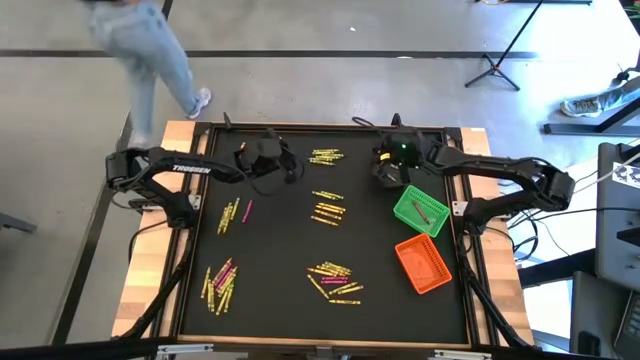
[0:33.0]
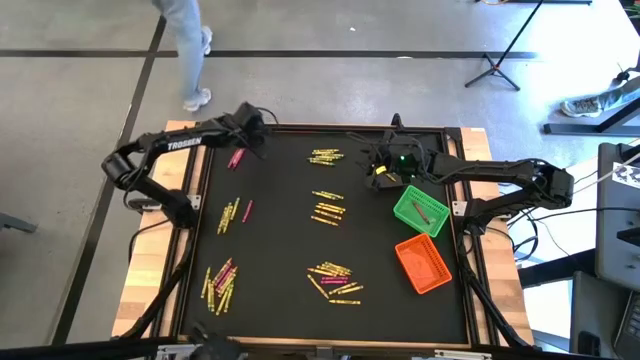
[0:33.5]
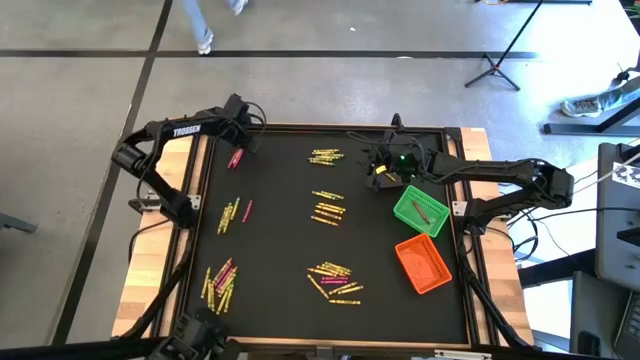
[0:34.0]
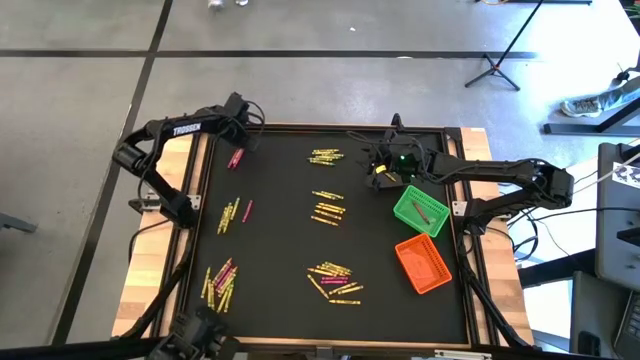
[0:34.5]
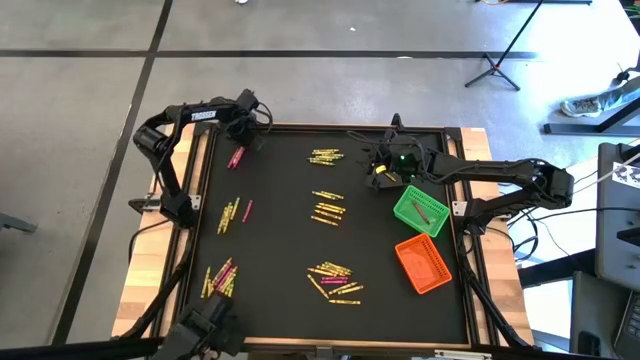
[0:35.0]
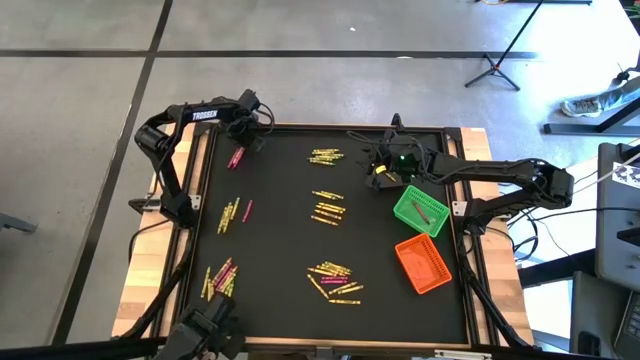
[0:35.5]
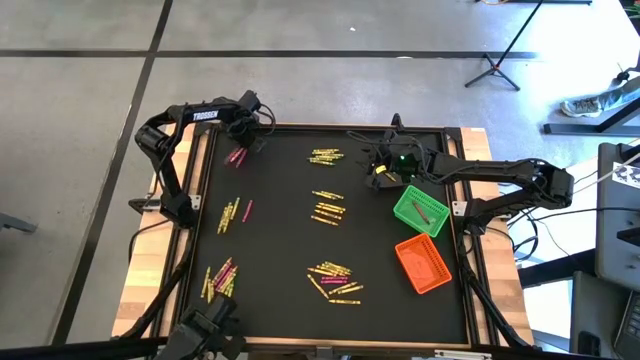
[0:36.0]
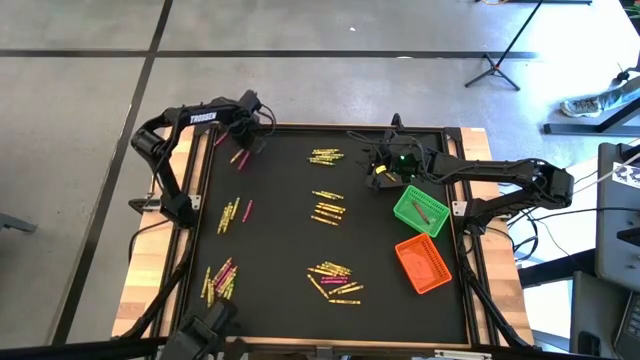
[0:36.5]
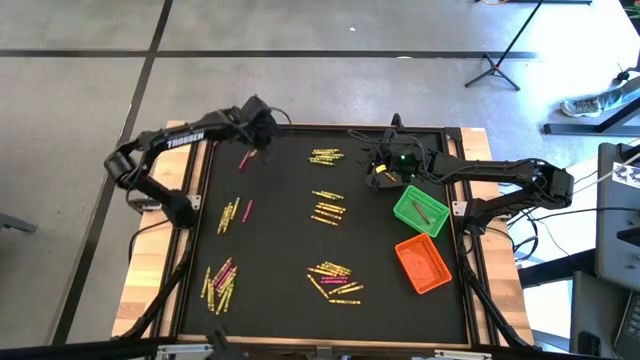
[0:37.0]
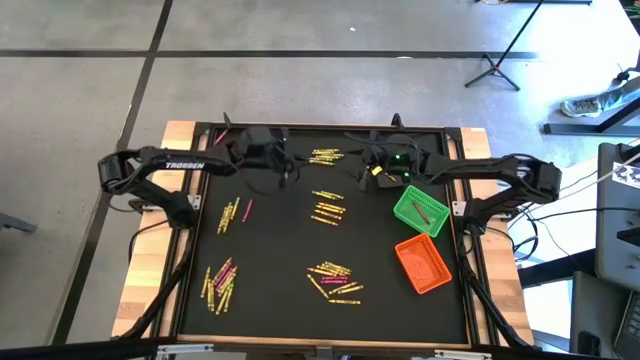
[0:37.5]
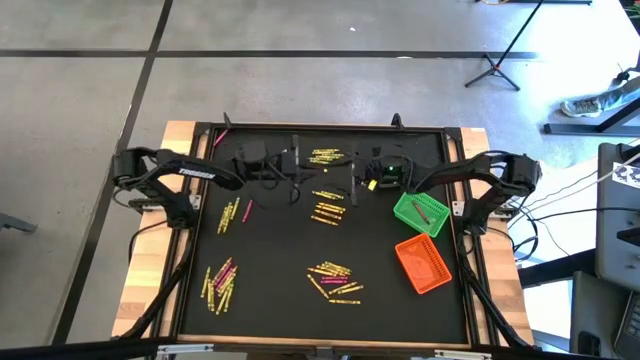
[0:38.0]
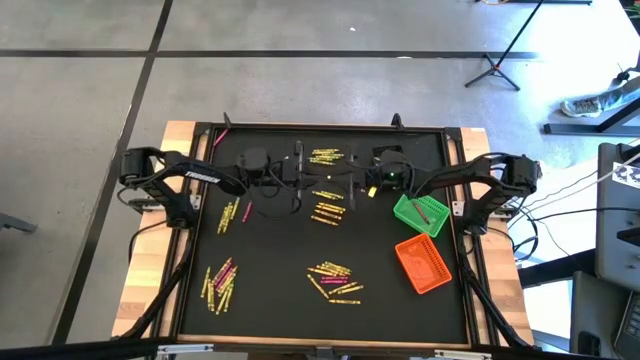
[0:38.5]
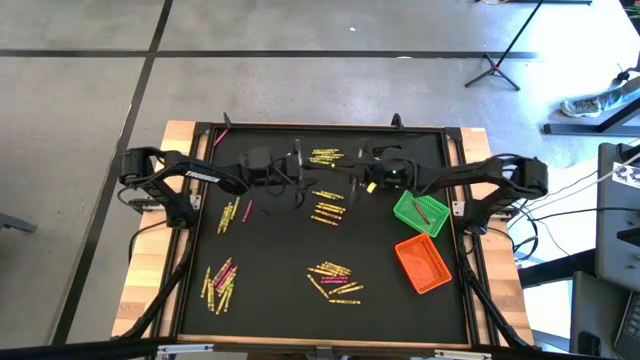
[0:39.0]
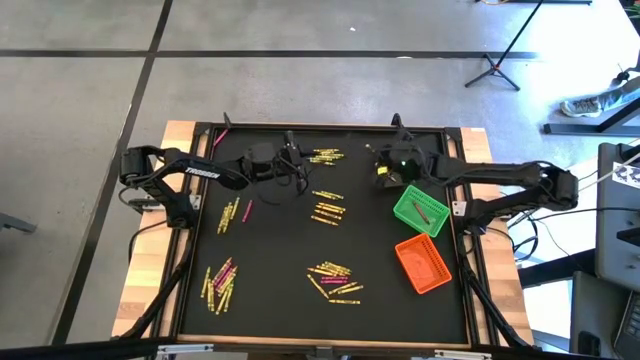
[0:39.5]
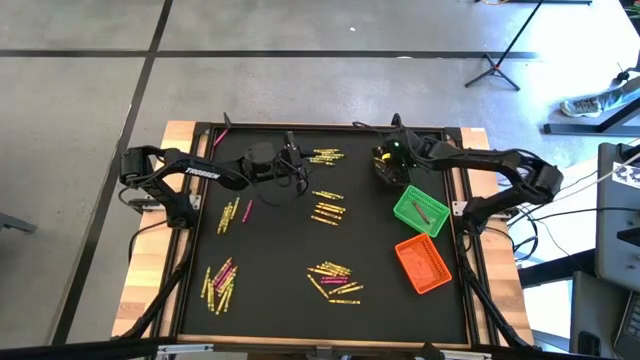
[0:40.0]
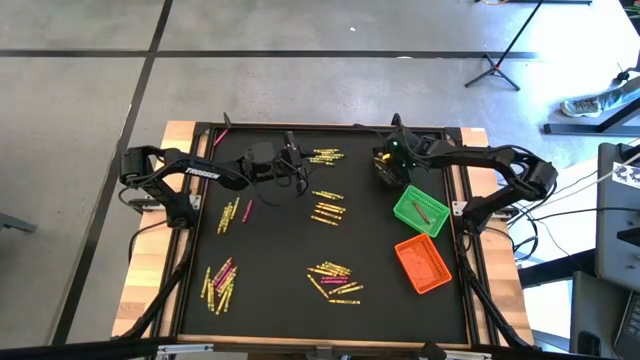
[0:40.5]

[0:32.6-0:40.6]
Task: Sort crayons
Put the yellow crayon into the black basket

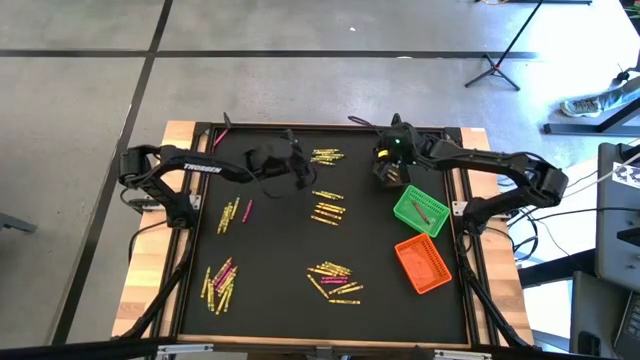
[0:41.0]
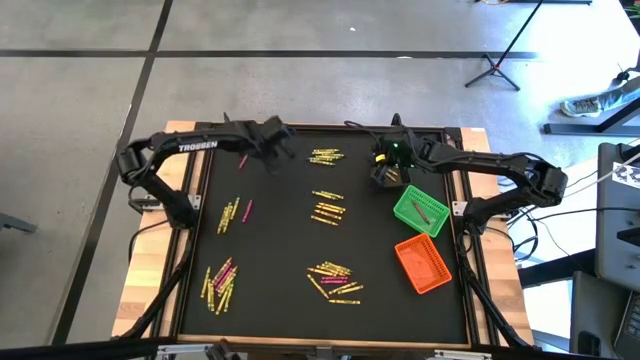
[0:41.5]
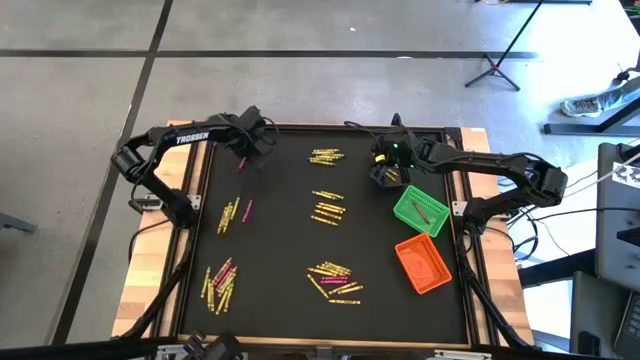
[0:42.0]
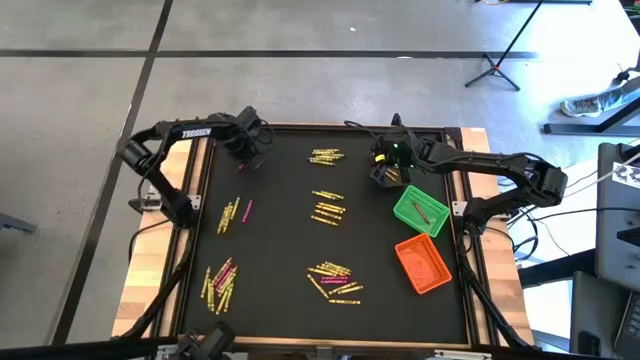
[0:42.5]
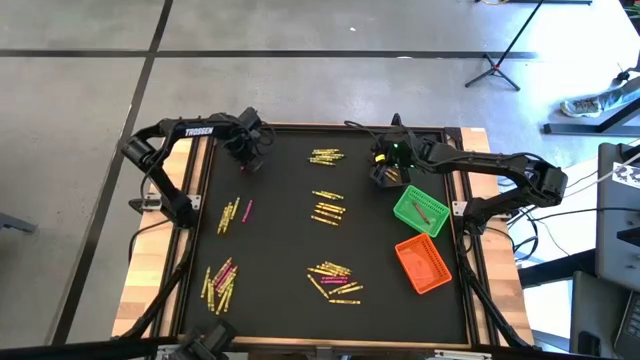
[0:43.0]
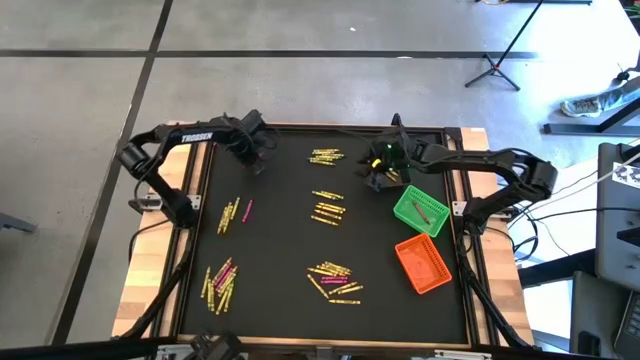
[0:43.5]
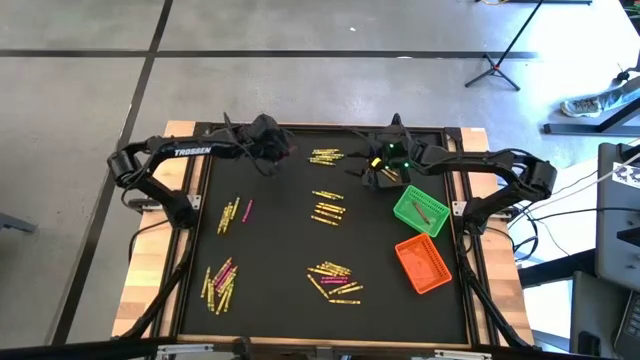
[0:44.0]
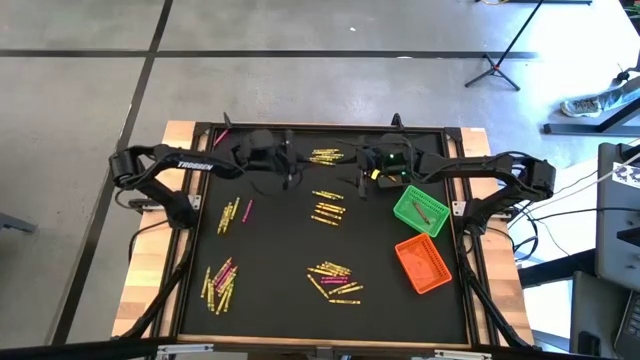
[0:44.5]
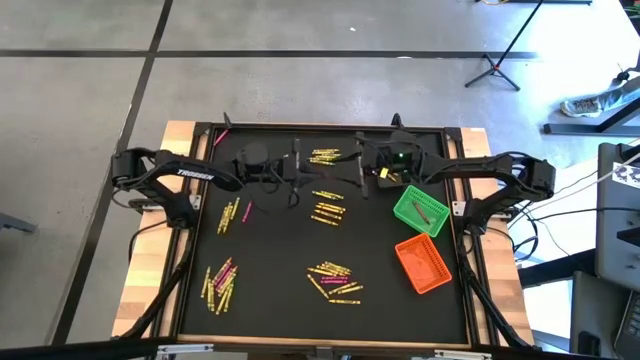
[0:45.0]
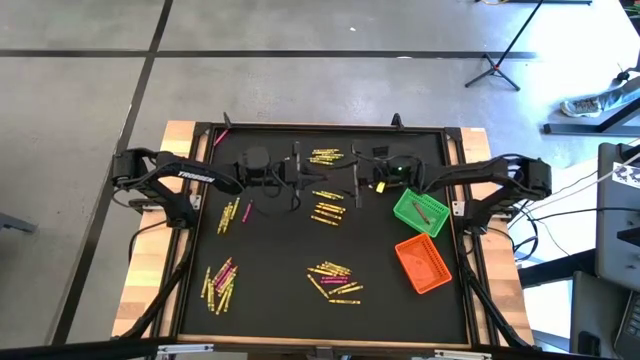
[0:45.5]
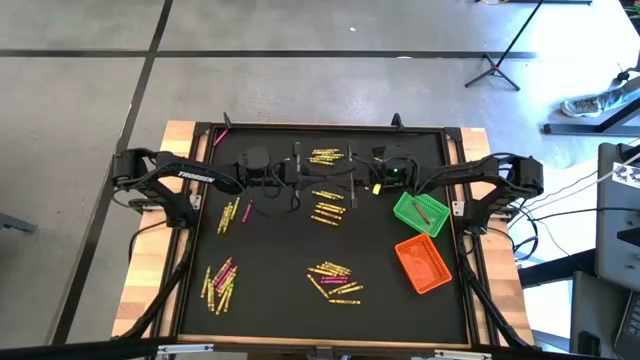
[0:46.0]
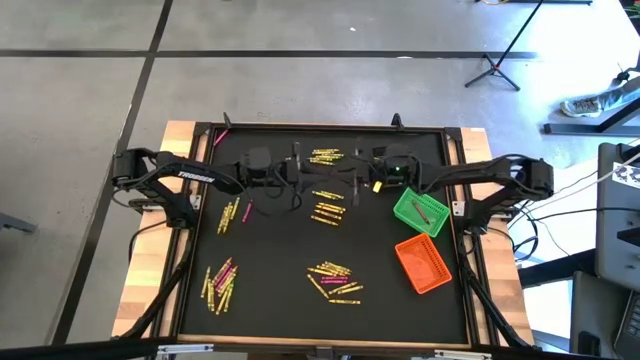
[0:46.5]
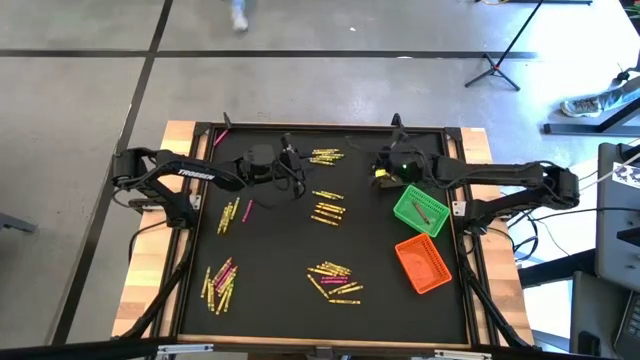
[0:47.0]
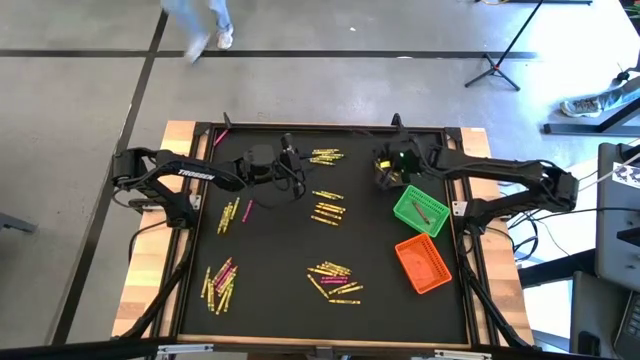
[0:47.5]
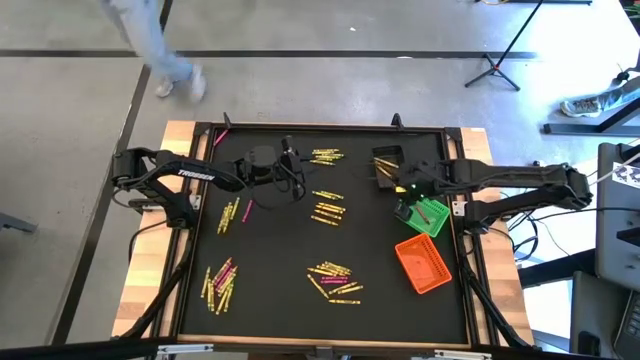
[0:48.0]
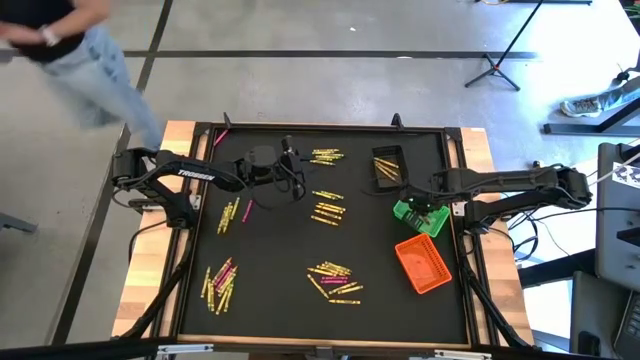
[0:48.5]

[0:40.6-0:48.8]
Put the red crayon into the green basket

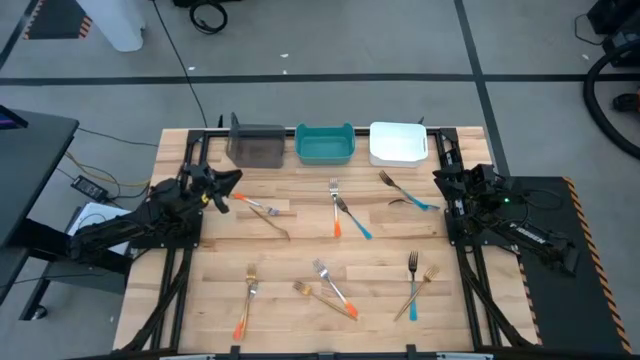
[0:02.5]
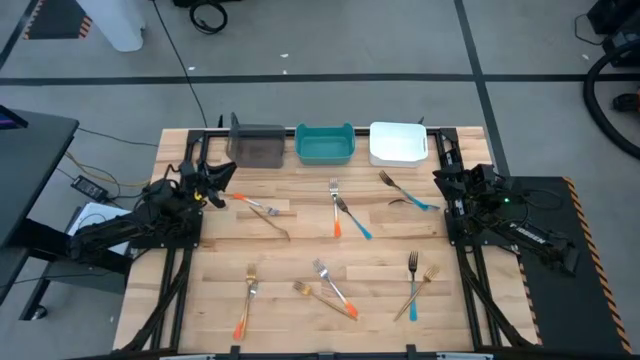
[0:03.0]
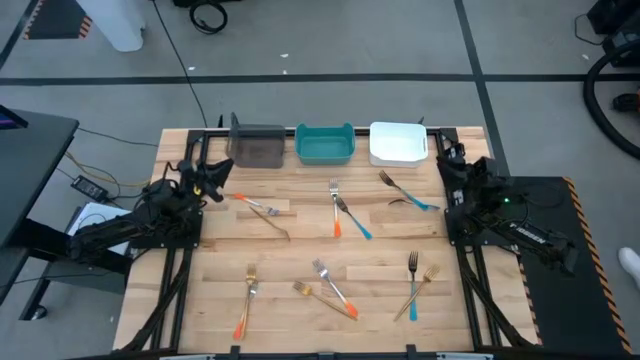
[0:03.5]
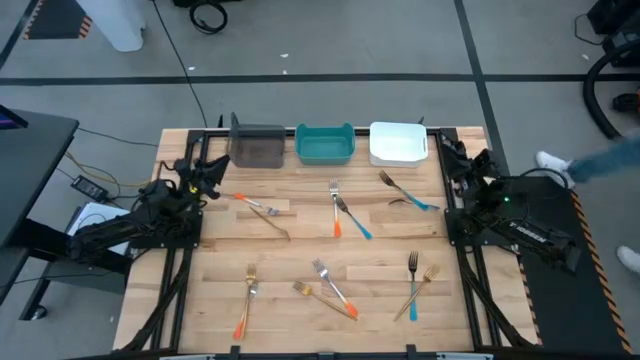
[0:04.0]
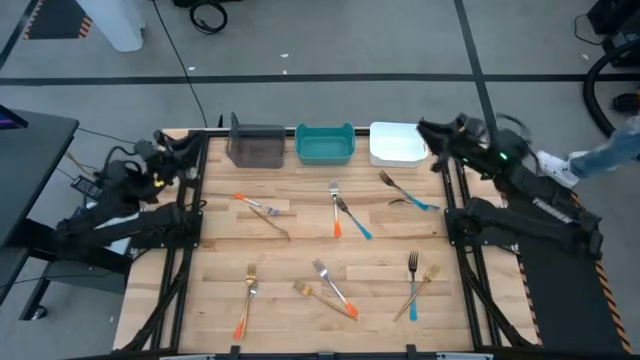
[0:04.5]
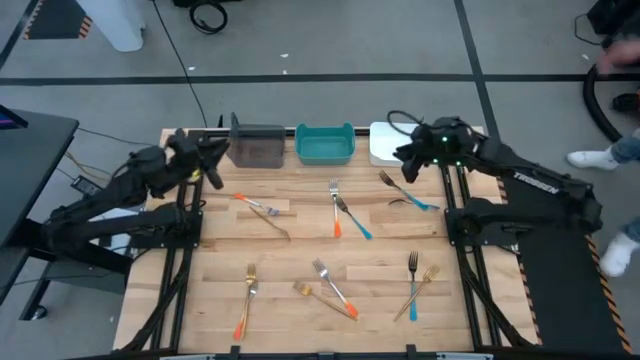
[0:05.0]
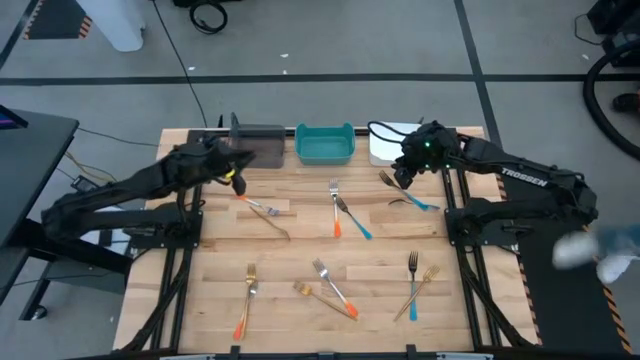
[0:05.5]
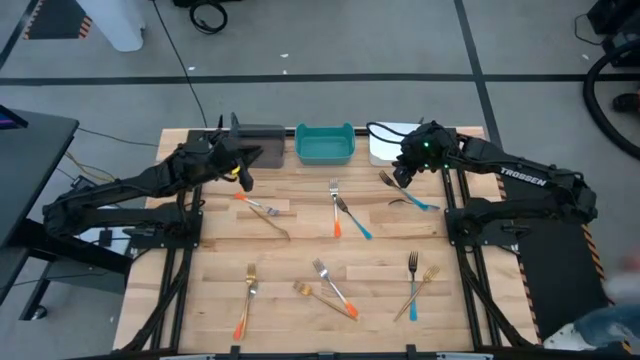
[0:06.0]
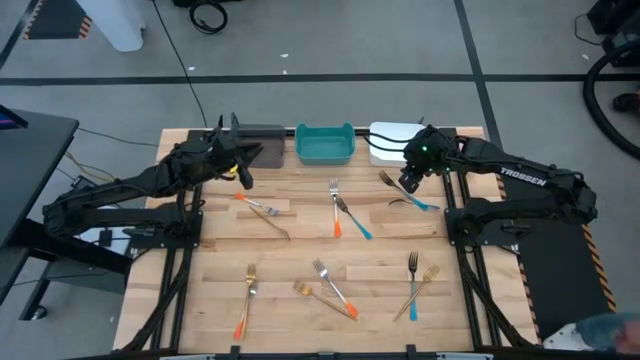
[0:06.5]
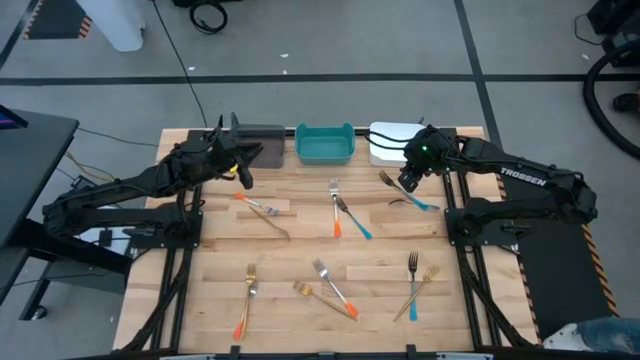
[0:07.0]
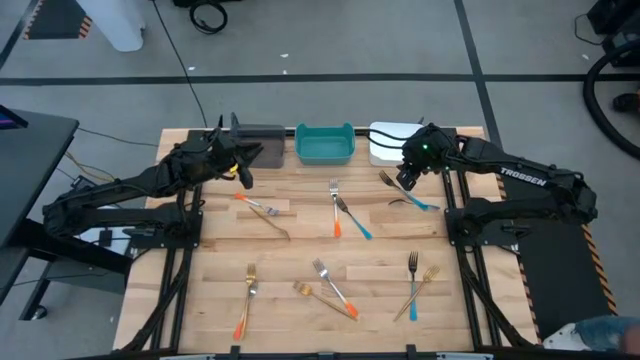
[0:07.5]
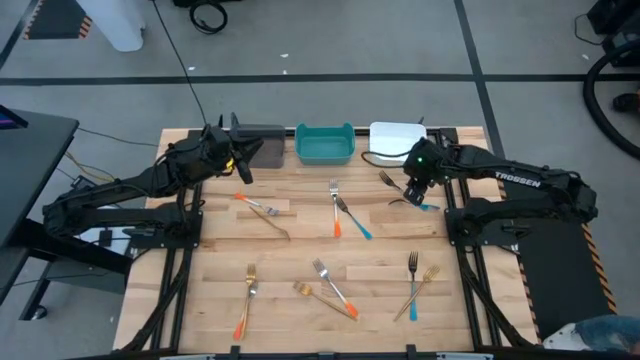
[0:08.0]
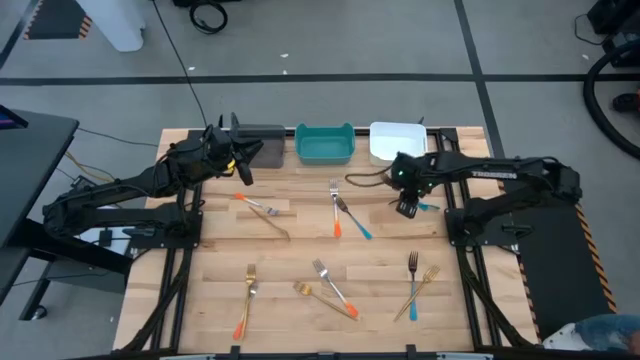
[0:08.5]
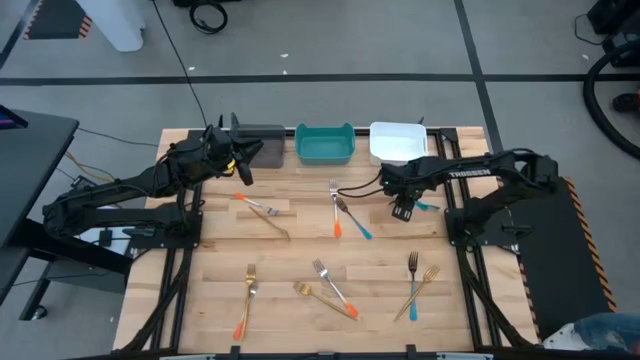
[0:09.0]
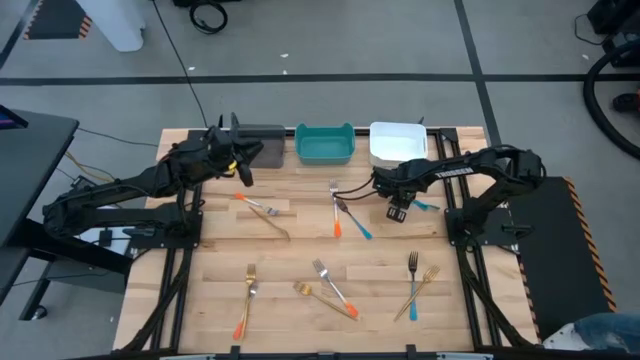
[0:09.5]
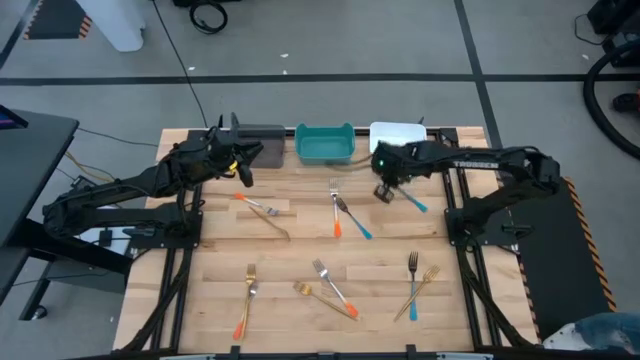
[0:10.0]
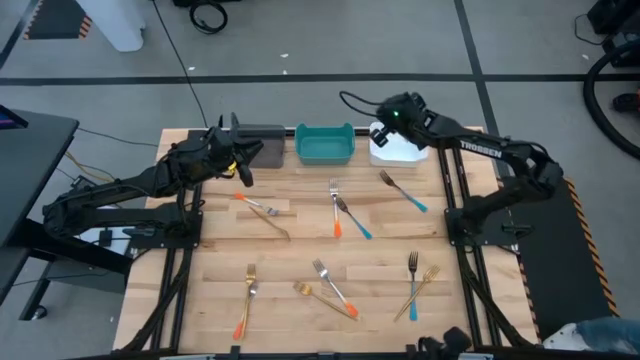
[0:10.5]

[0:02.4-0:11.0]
Task: Sort silverware by color (type)
Put the blue fork into the white bin
